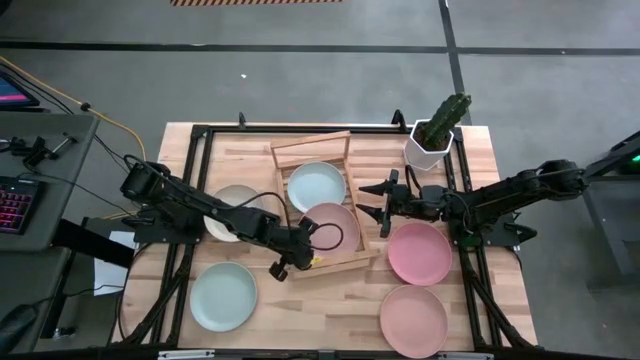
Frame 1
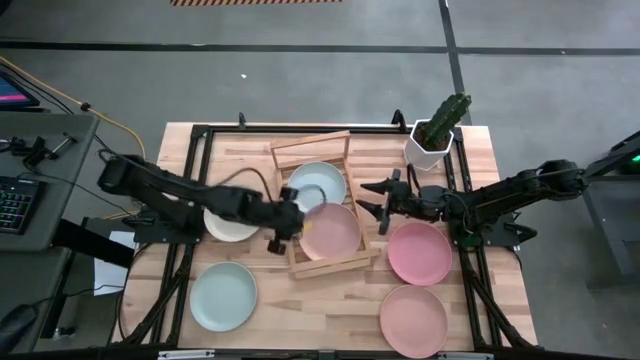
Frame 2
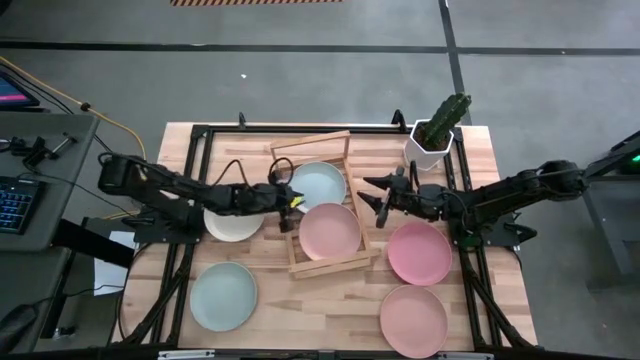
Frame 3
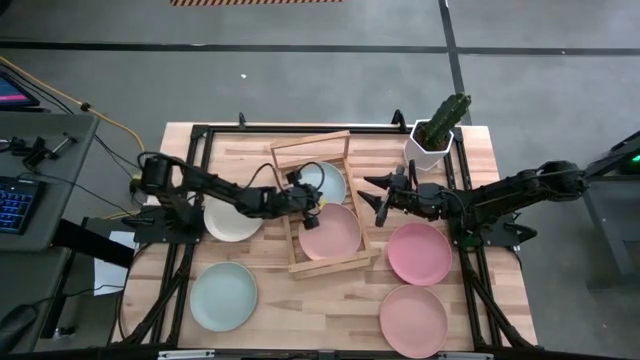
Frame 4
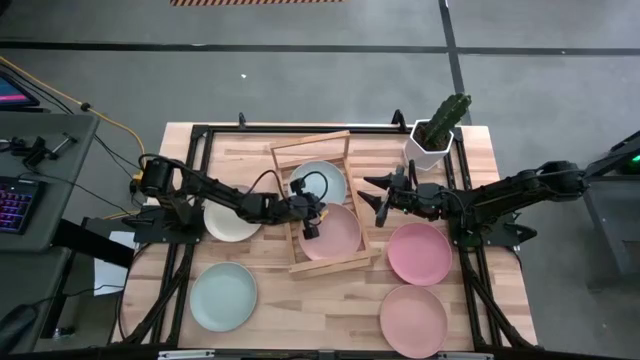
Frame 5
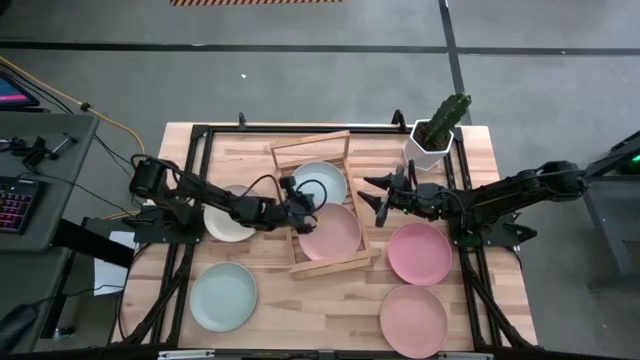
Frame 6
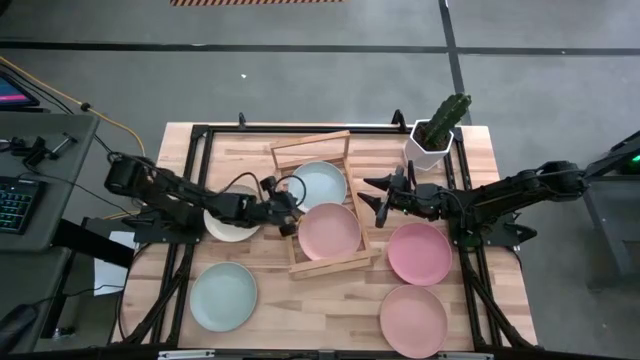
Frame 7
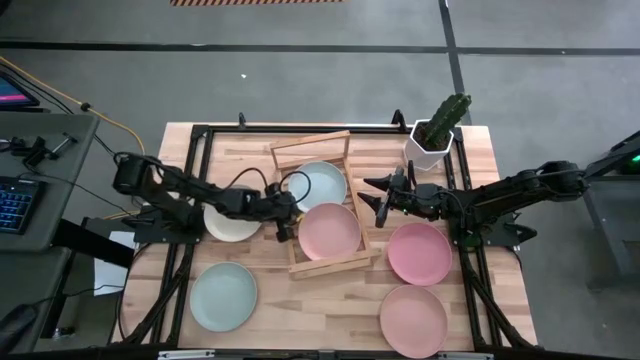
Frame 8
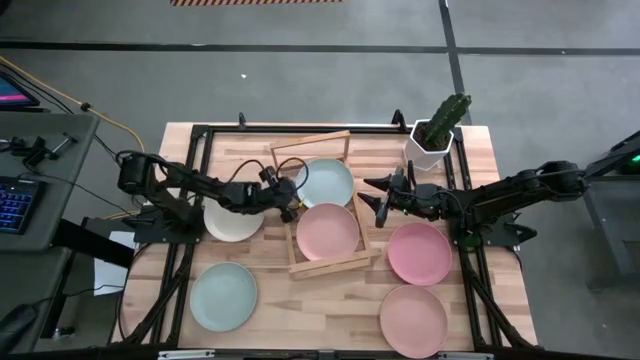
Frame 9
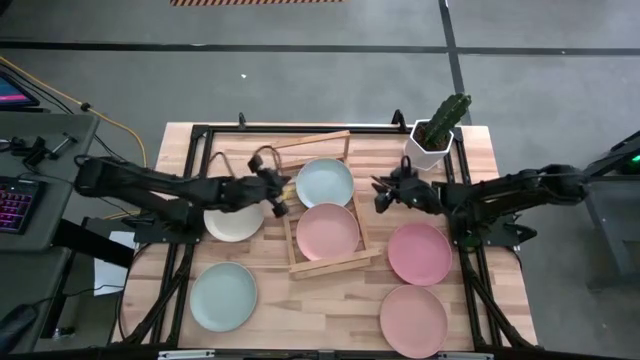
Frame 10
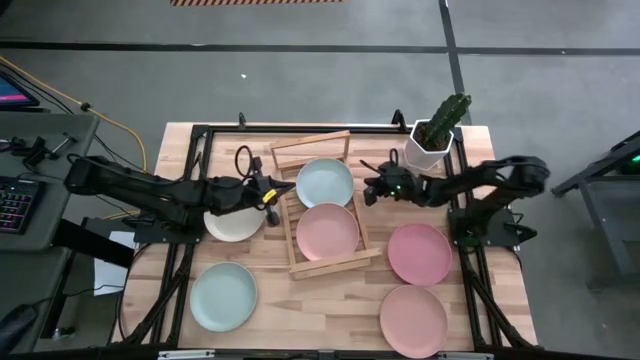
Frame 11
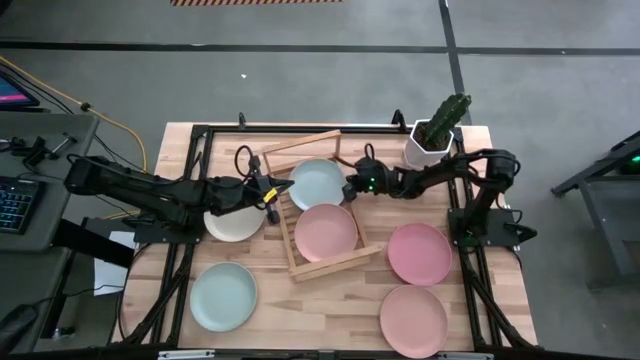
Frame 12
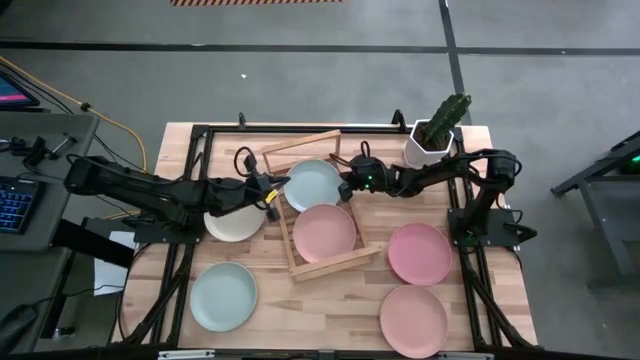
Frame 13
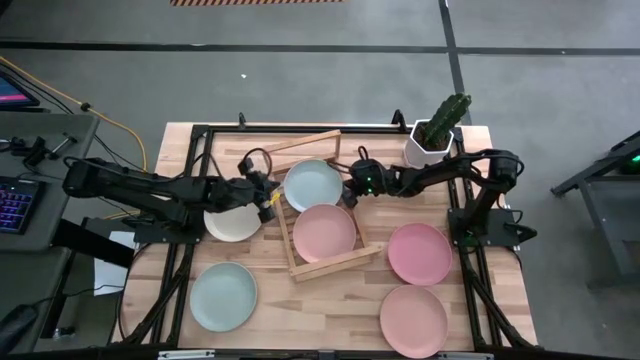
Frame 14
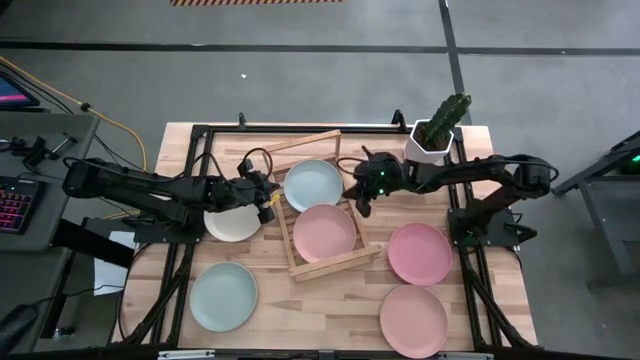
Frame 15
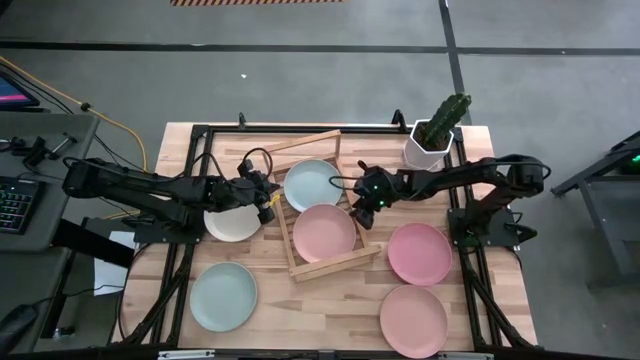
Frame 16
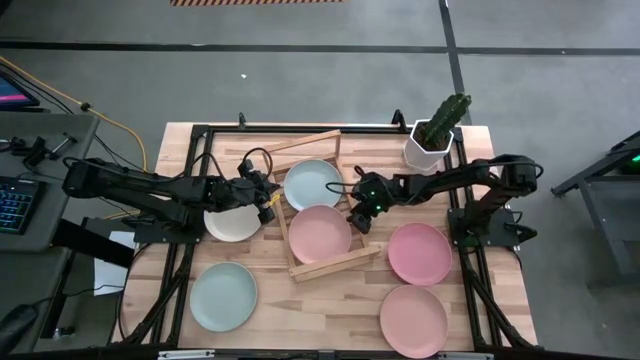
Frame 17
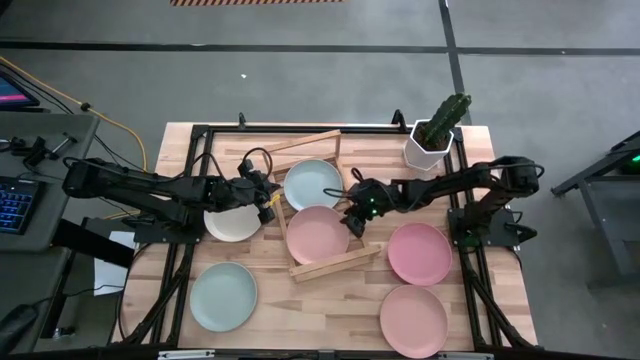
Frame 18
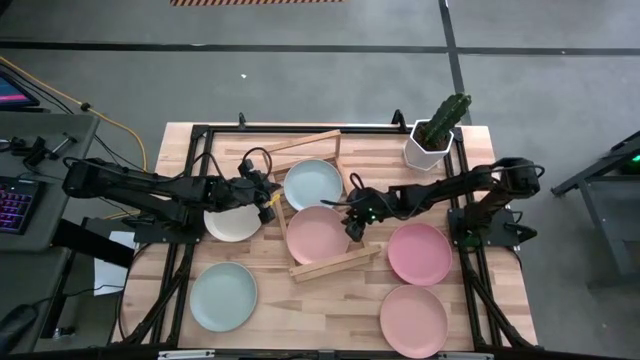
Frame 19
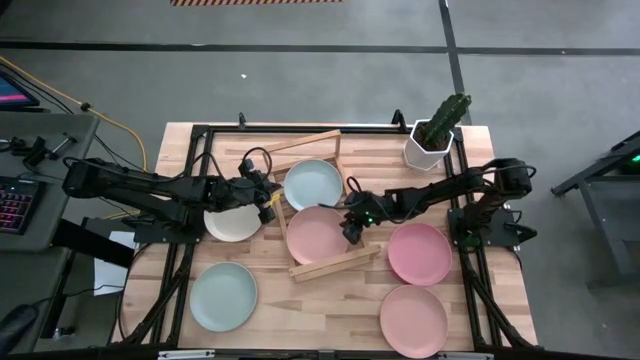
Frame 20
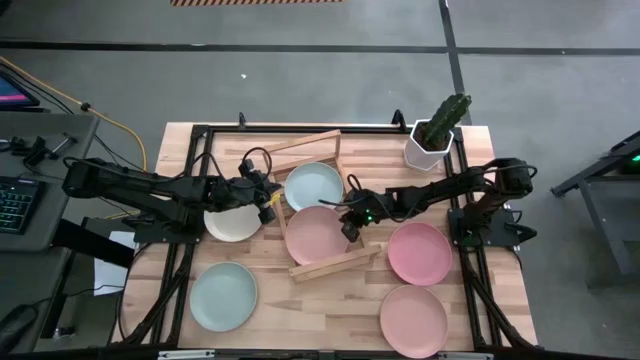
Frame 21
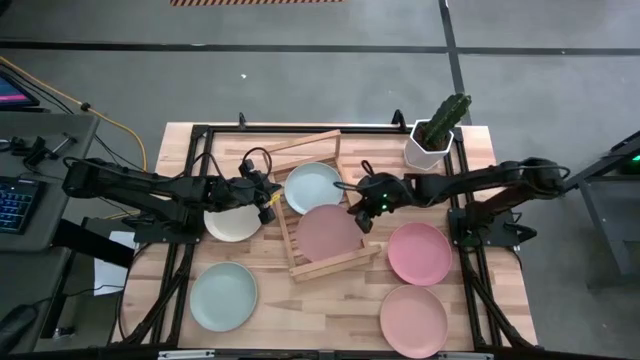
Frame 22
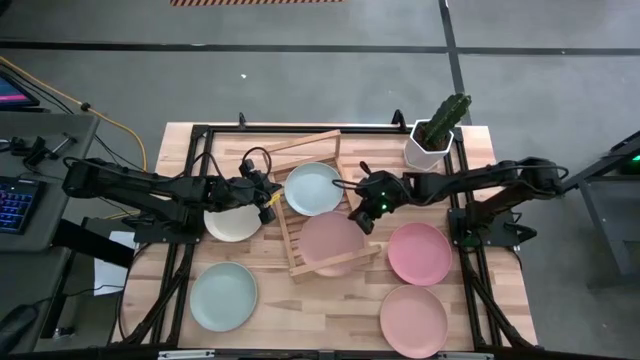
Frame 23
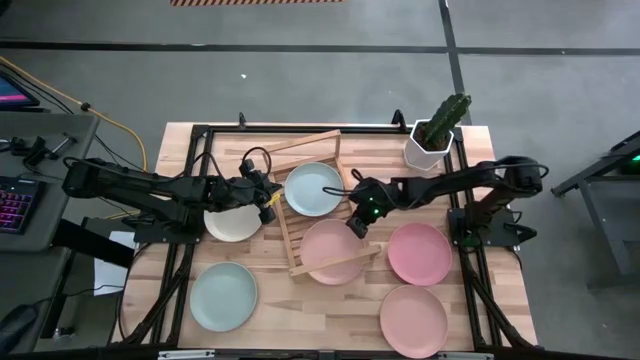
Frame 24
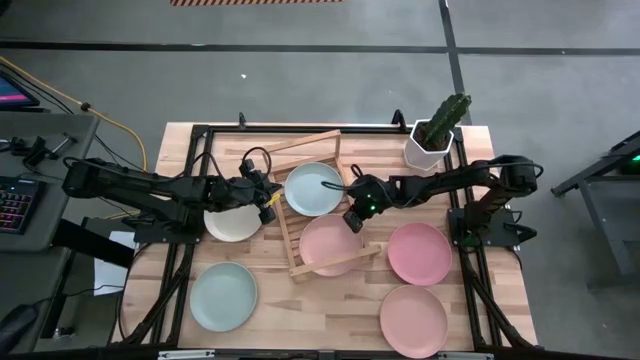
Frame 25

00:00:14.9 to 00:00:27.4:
Task: Place and stack plates onto a shelf
Adjust the plates on the shelf

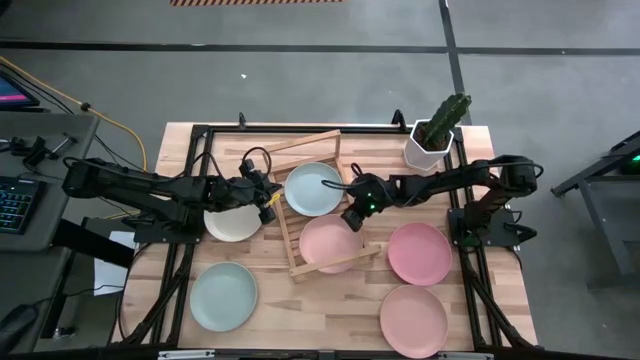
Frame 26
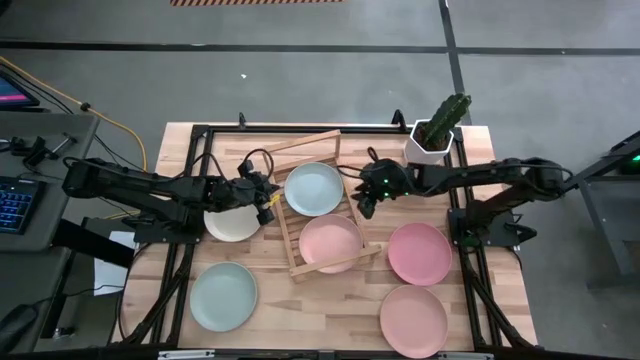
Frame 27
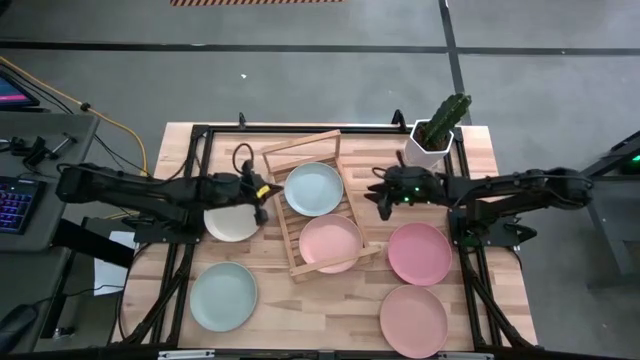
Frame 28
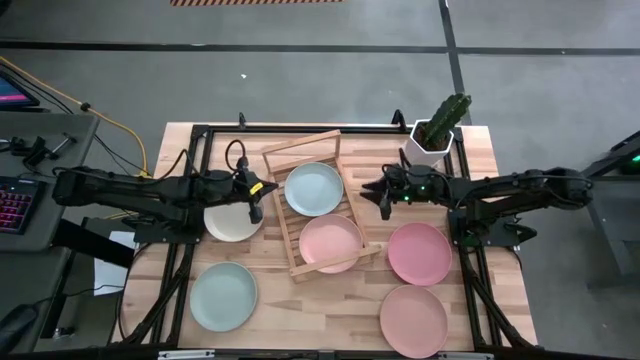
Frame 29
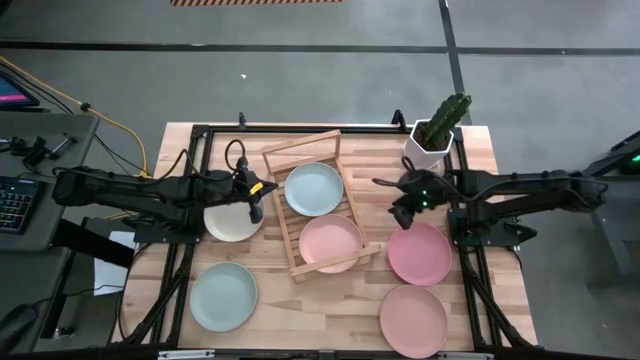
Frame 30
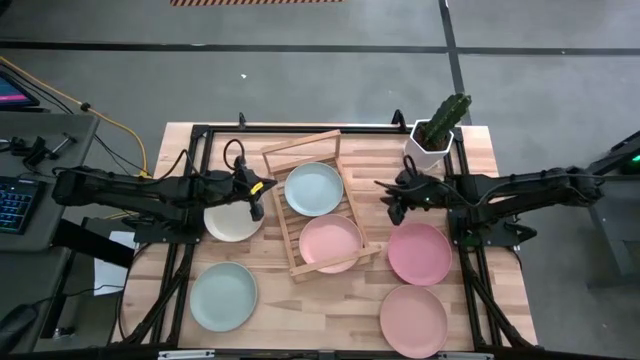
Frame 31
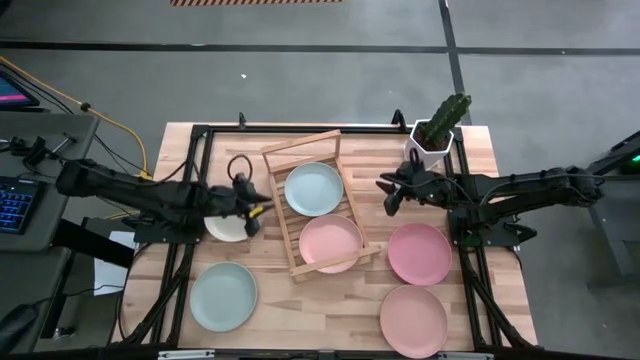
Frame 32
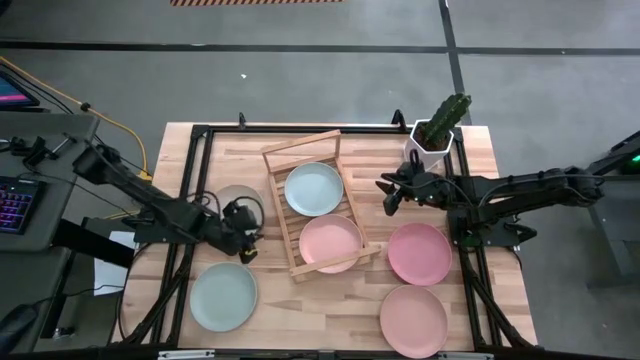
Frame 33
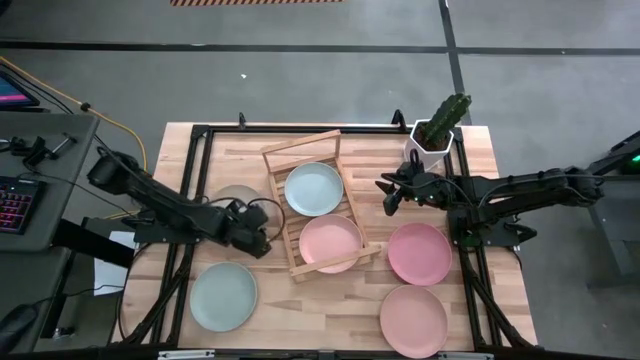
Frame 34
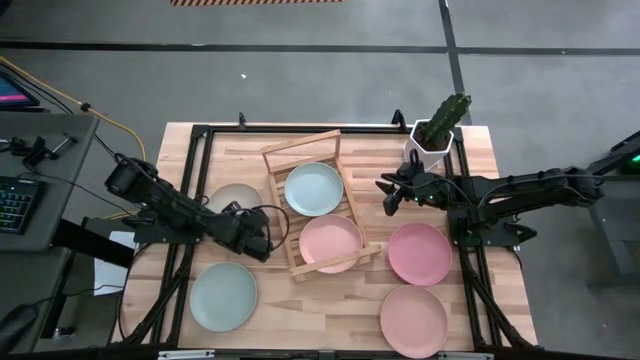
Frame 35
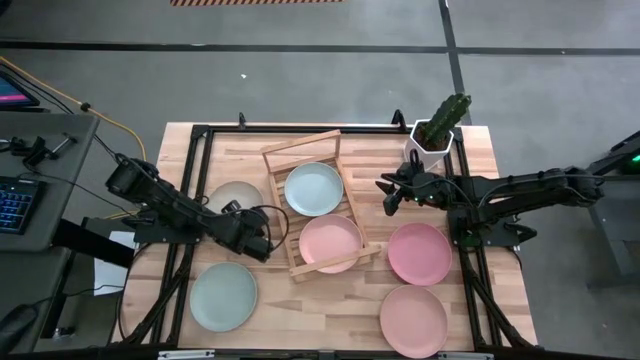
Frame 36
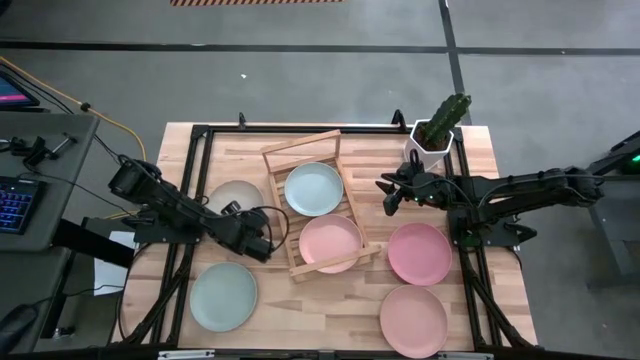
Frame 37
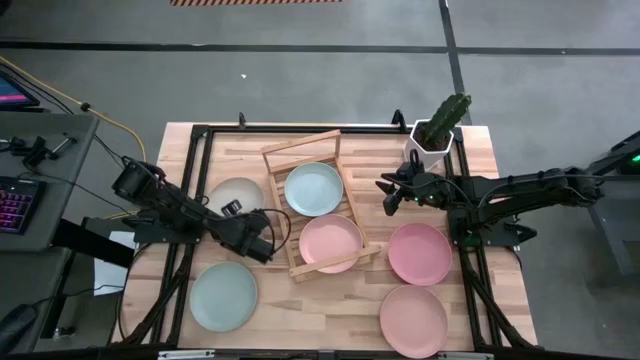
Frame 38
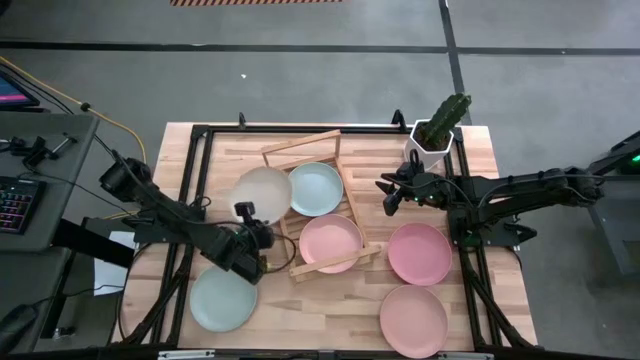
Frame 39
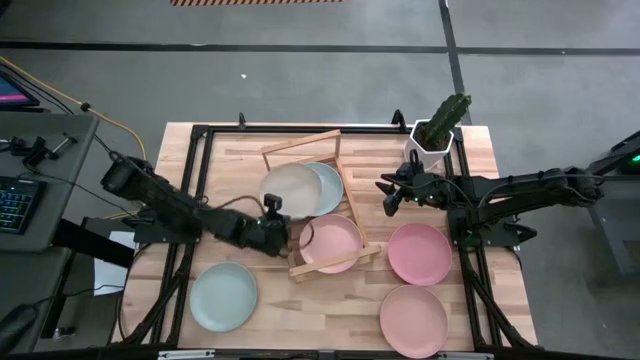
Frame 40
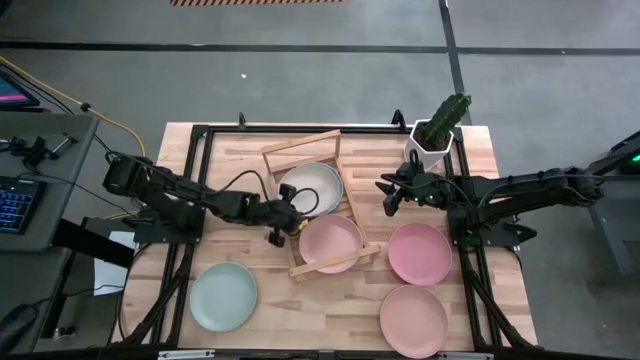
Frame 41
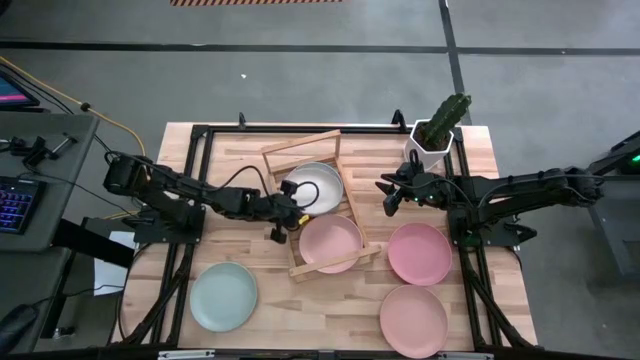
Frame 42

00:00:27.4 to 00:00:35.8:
Stack the gray plate on top of the blue plate on the shelf

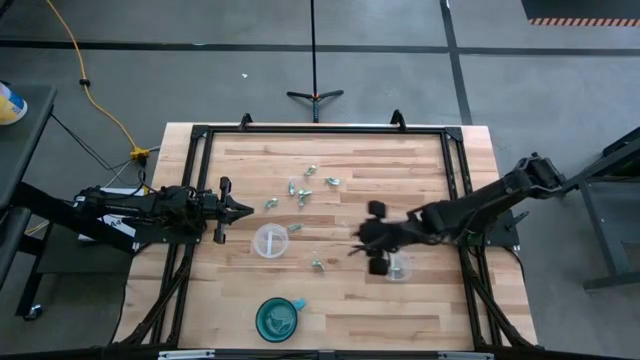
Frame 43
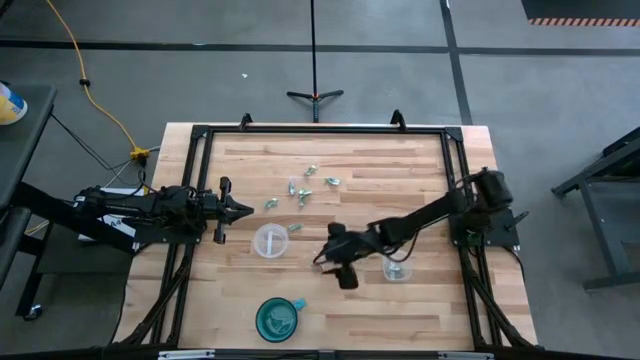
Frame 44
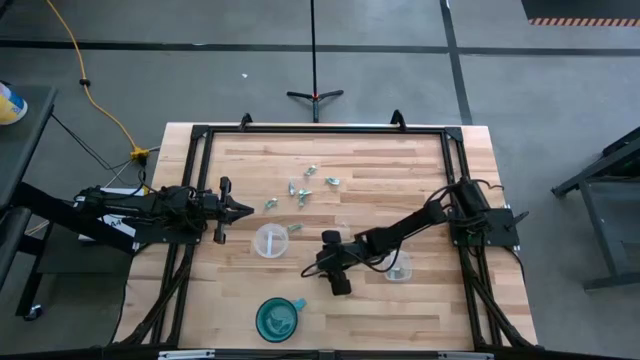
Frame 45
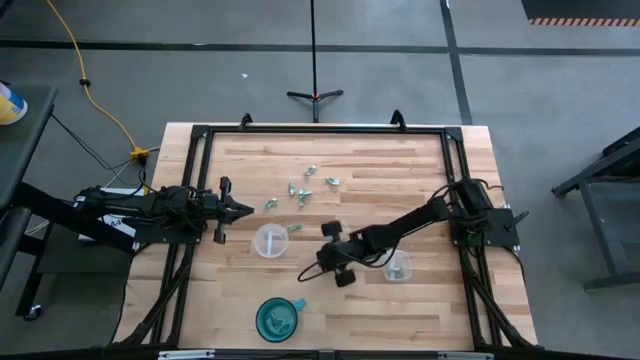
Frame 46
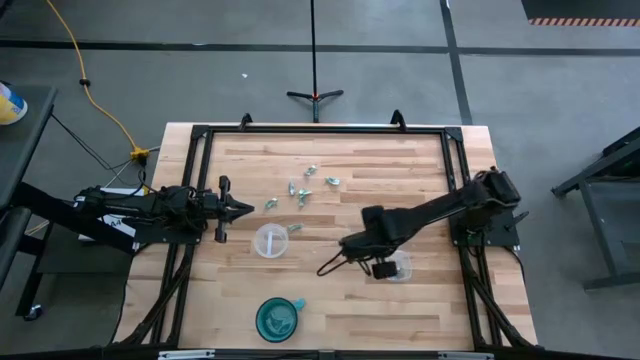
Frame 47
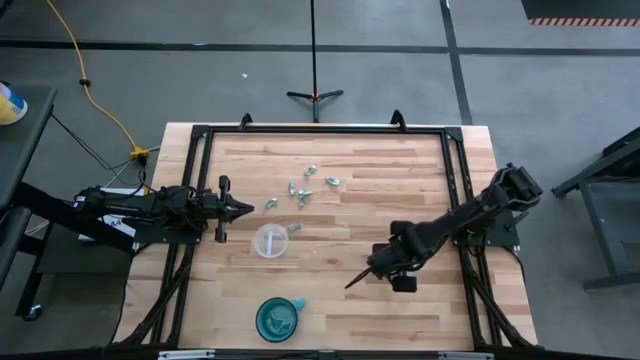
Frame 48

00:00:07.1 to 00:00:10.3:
Task: Sort candy
Put the green candy into the square transparent bin
